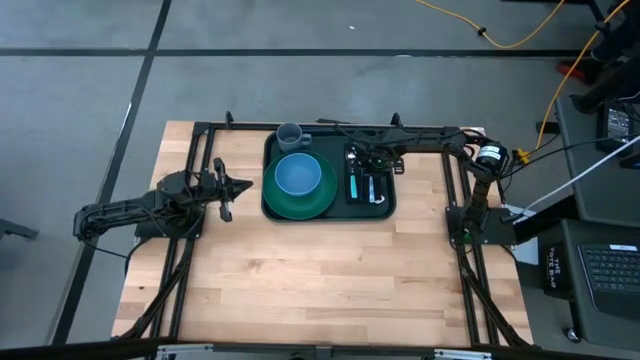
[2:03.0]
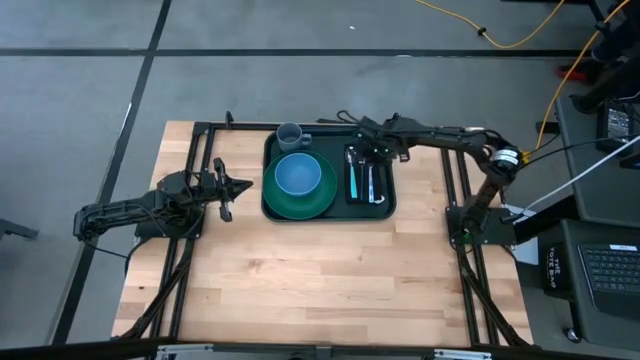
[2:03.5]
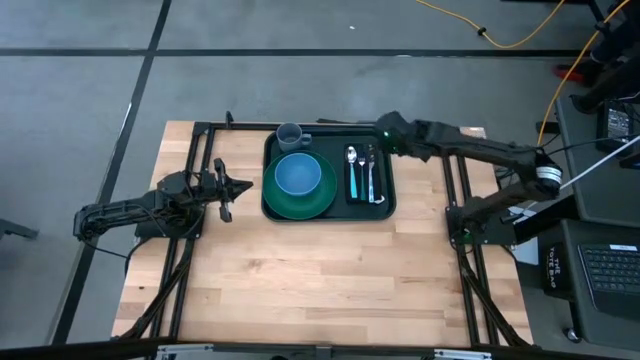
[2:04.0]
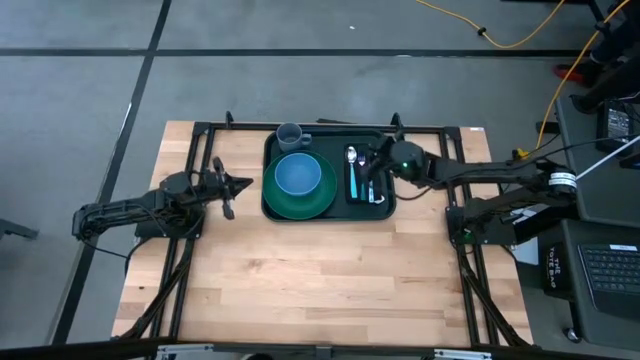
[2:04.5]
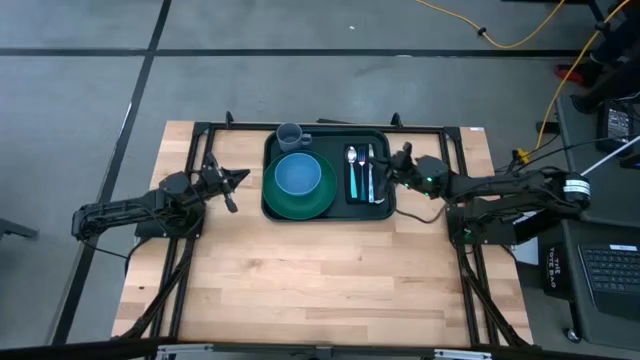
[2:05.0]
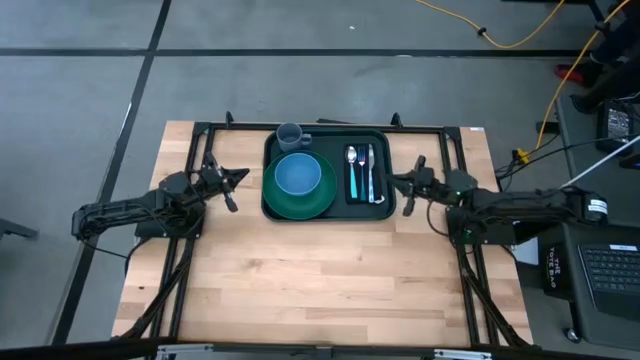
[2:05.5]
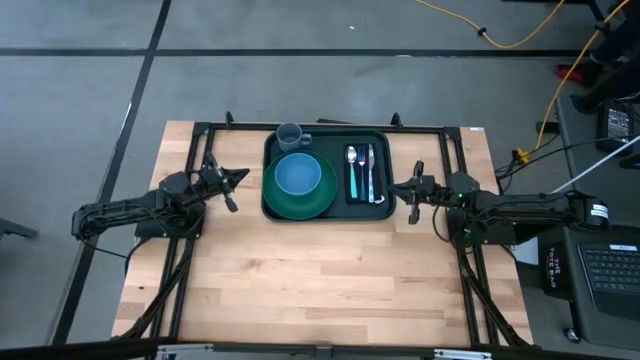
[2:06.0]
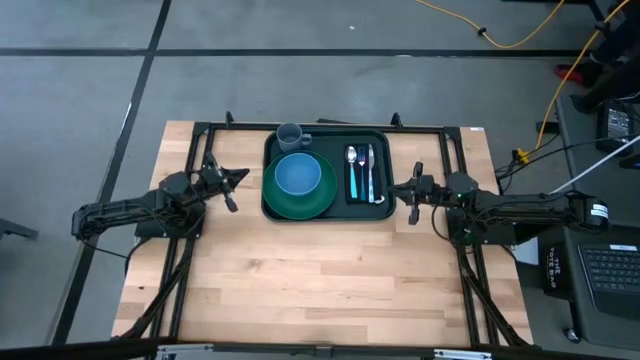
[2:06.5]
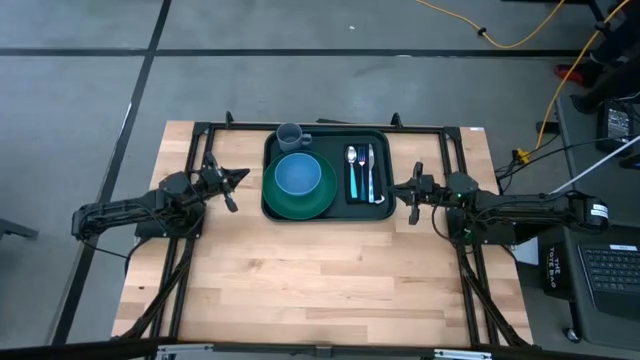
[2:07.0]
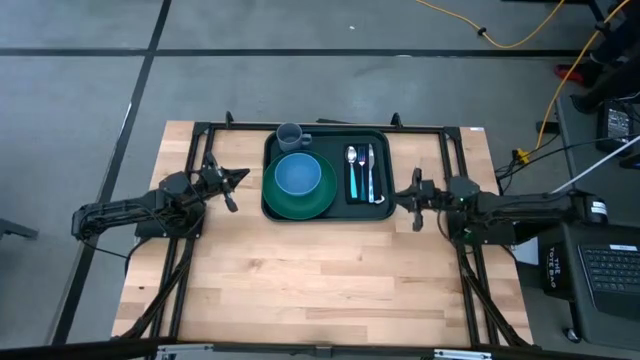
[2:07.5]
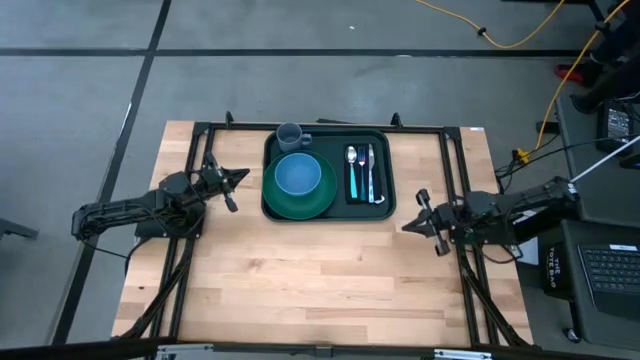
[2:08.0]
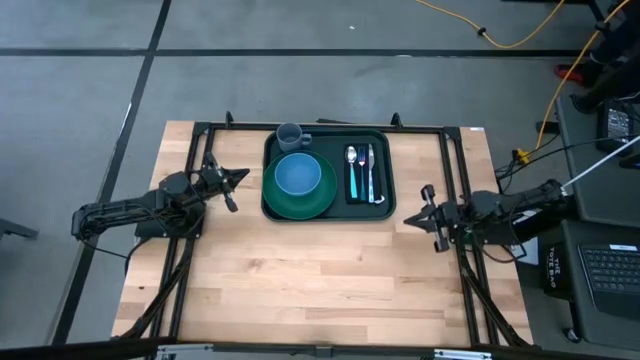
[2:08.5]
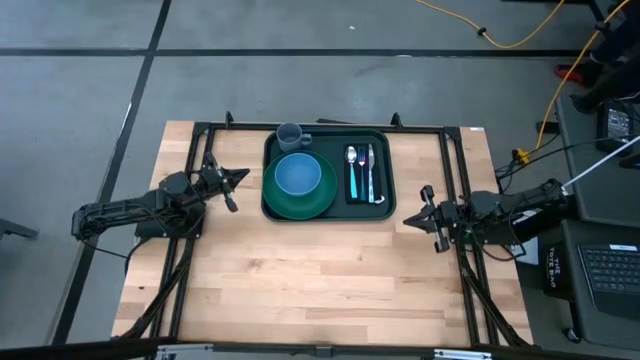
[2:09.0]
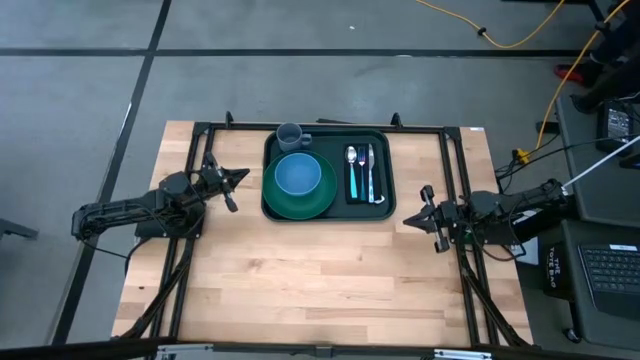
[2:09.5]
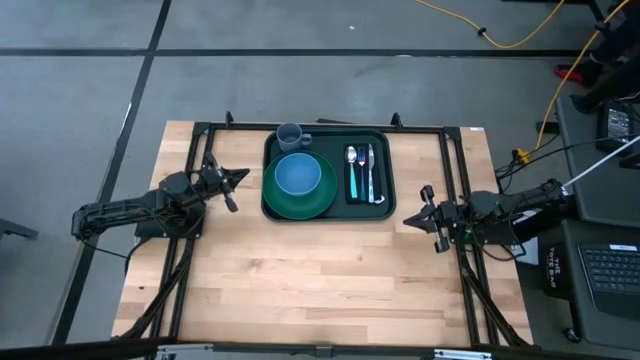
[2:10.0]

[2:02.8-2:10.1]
Task: Set up tray
Return to Home Position

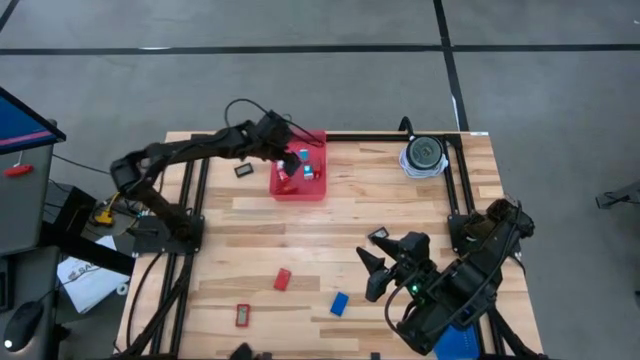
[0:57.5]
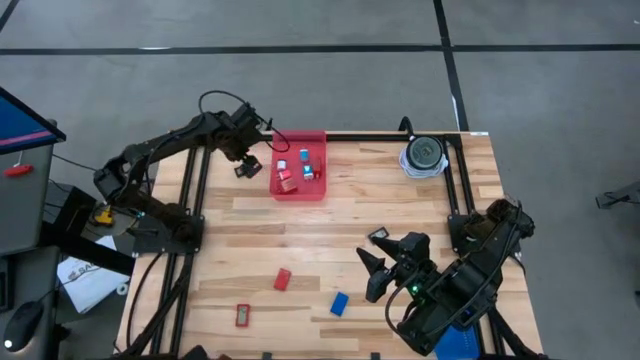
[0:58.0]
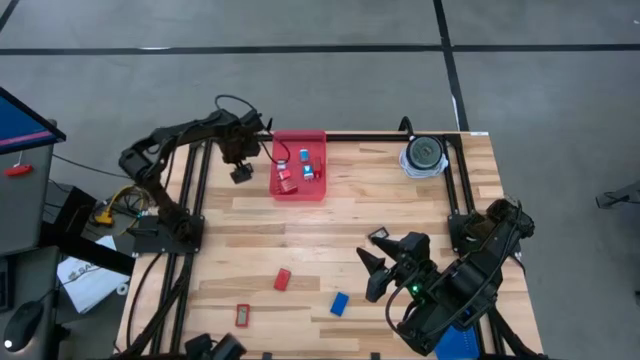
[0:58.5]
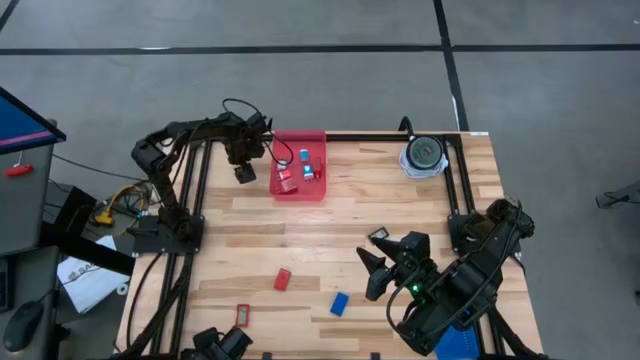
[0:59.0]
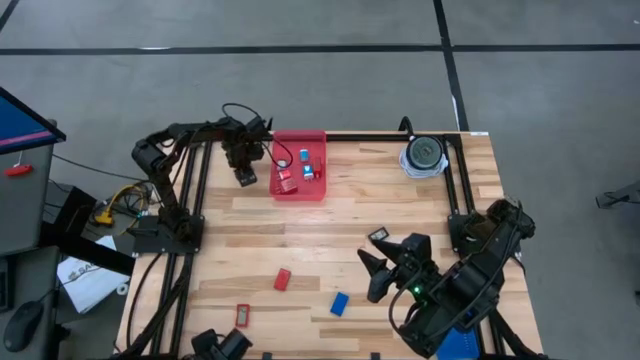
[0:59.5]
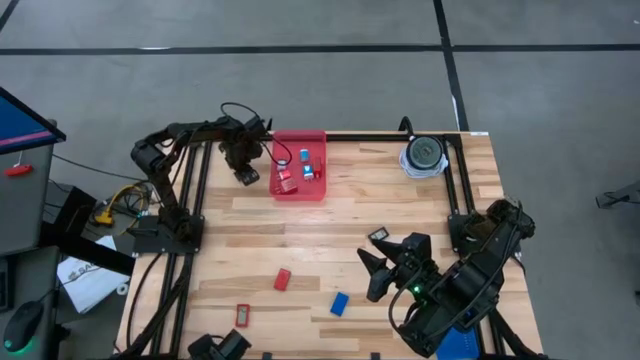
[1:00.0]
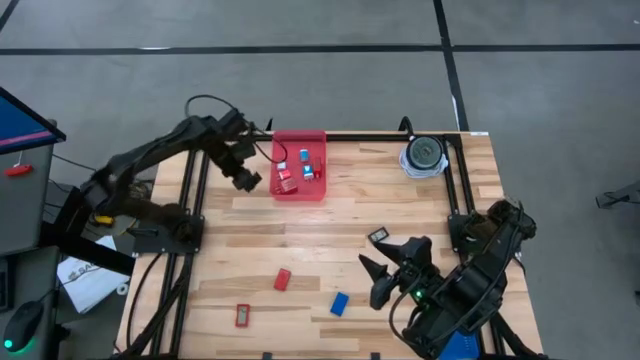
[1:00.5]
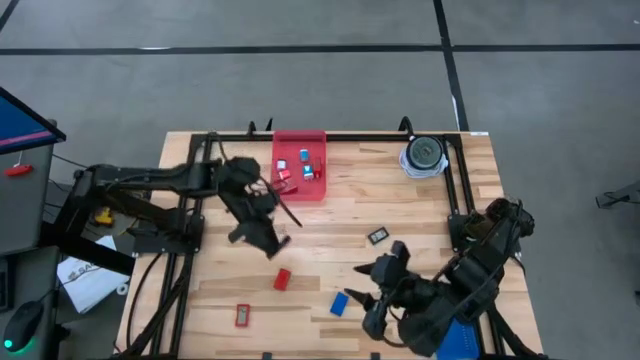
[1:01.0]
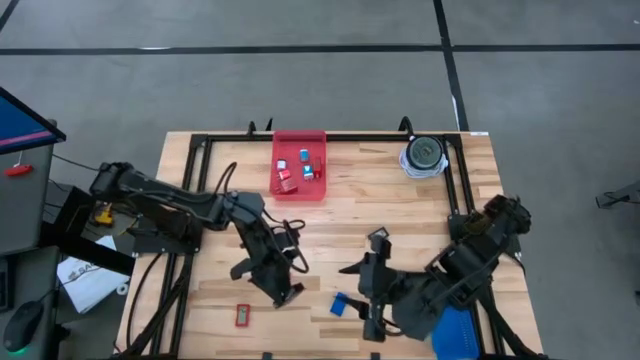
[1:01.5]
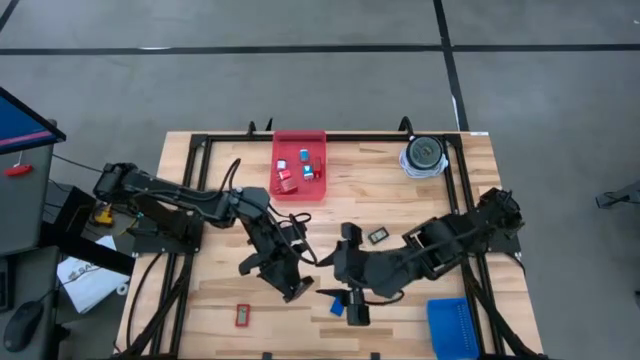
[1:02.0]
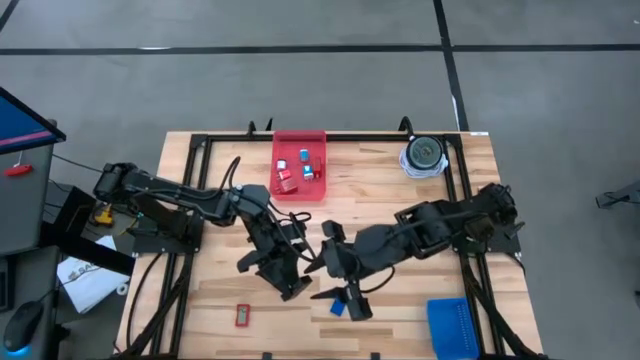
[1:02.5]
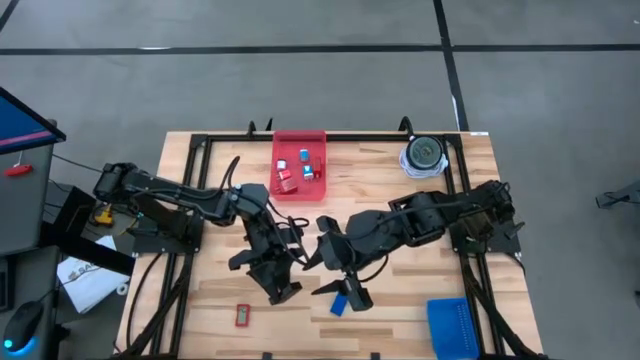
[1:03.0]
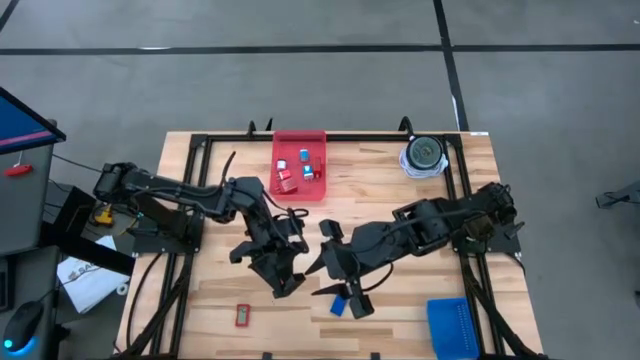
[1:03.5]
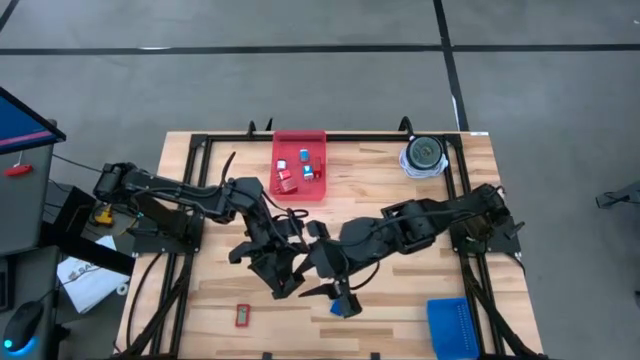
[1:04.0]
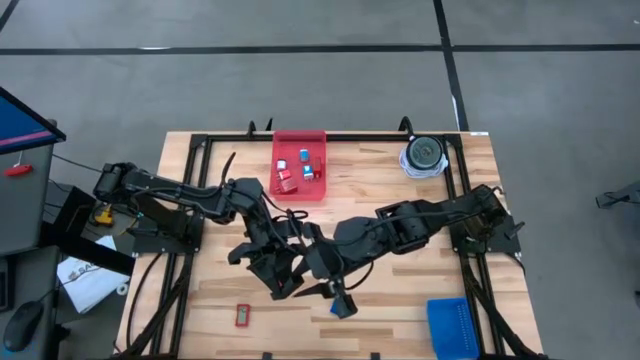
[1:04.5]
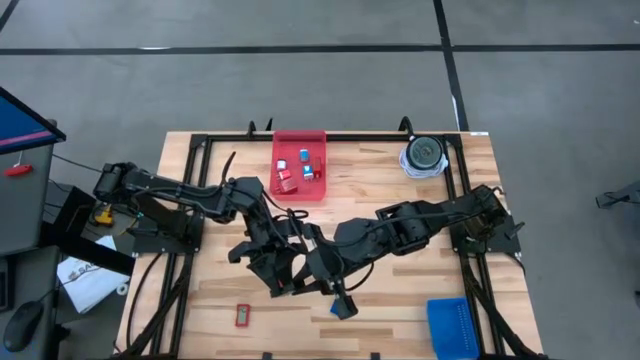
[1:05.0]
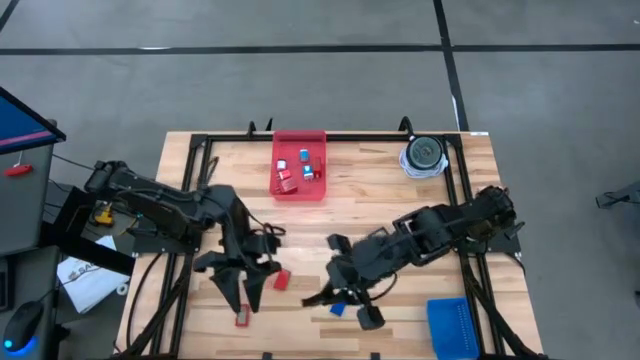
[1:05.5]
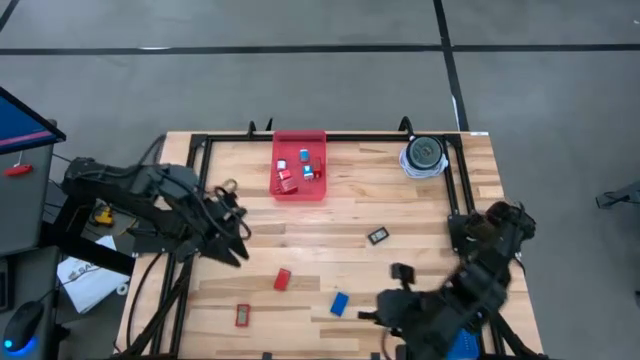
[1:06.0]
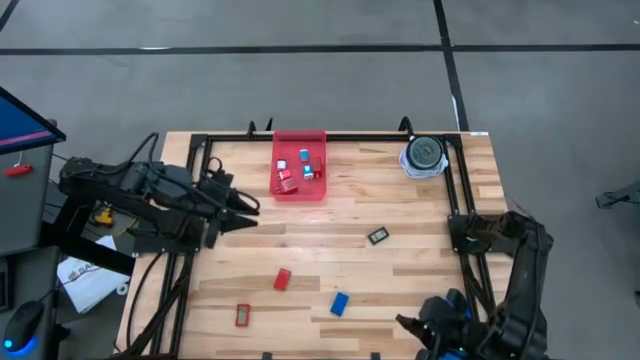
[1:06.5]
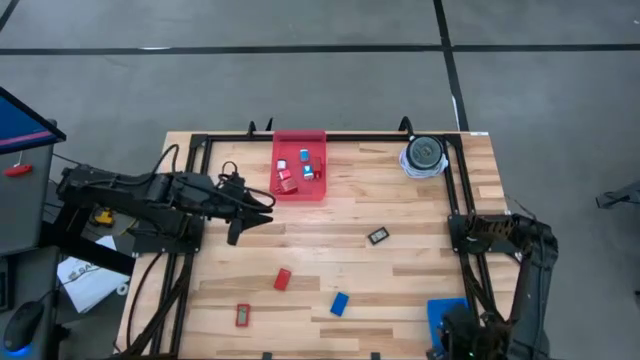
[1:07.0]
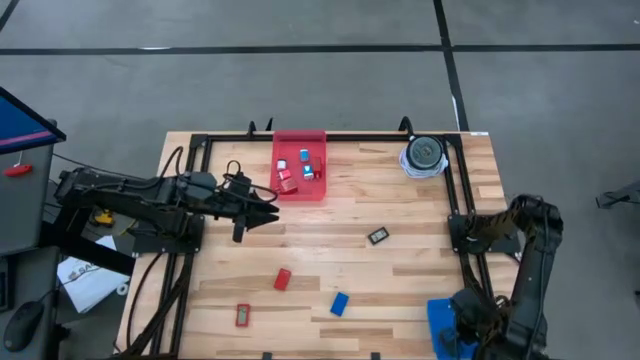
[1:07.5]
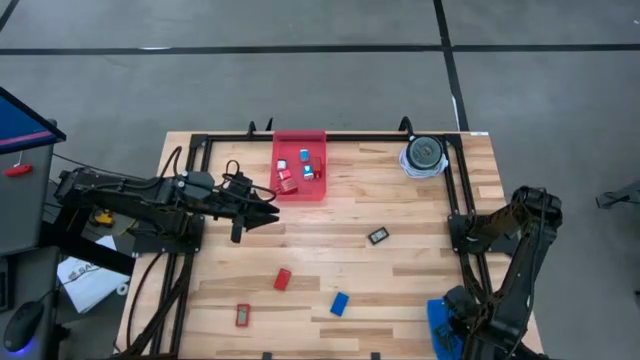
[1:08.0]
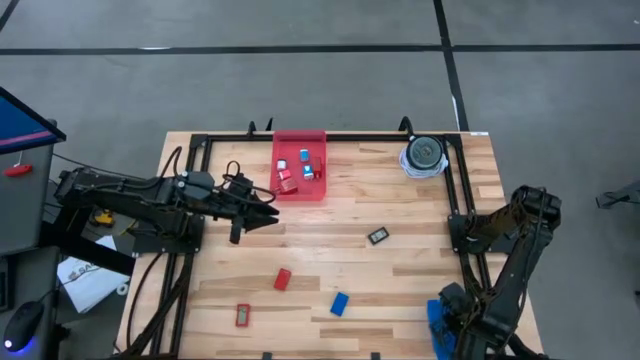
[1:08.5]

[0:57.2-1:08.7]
Task: Pick & Place Office items
Put the left black digital timer into the blue bin
